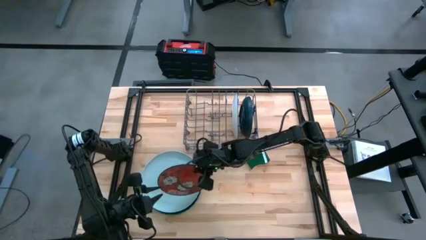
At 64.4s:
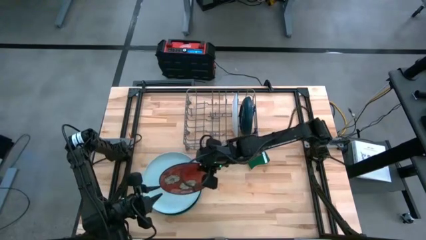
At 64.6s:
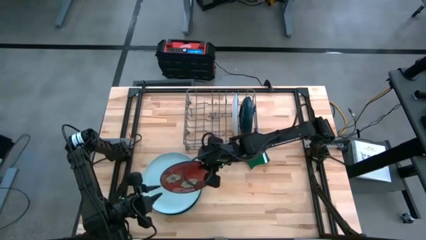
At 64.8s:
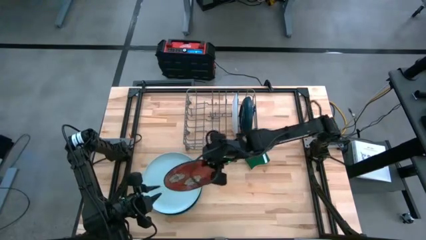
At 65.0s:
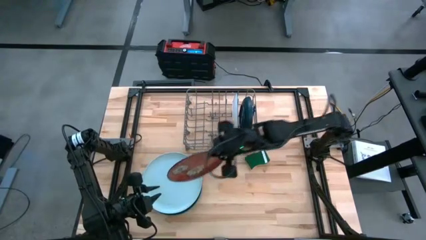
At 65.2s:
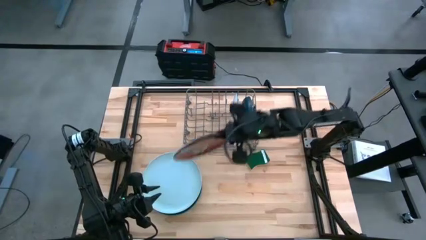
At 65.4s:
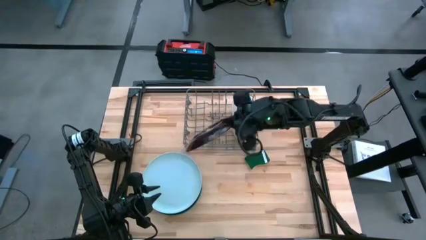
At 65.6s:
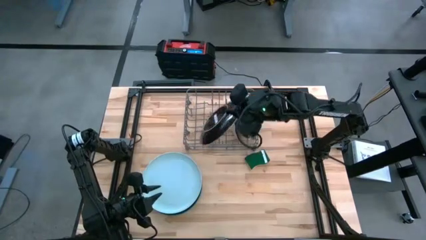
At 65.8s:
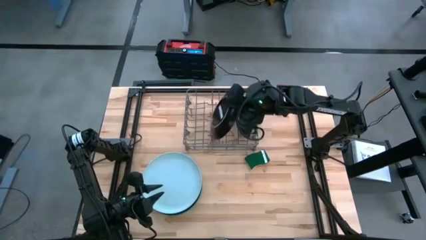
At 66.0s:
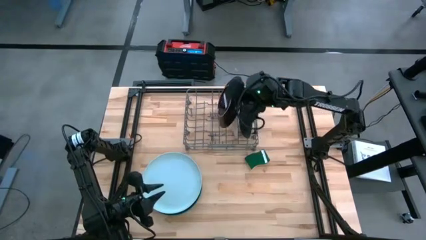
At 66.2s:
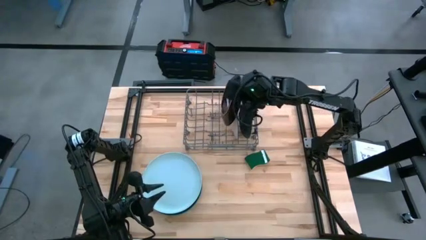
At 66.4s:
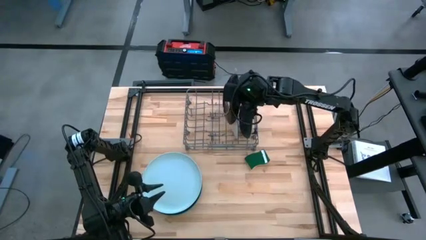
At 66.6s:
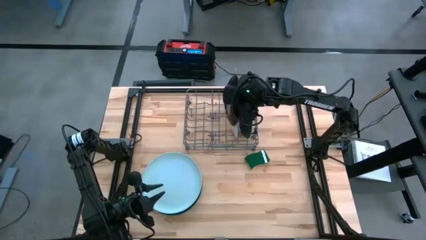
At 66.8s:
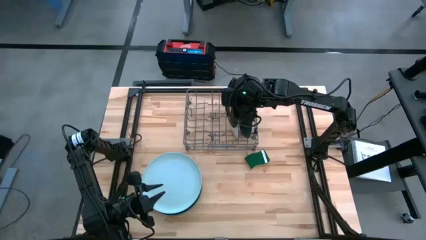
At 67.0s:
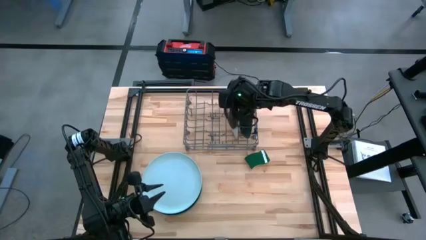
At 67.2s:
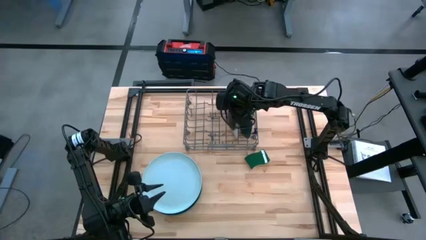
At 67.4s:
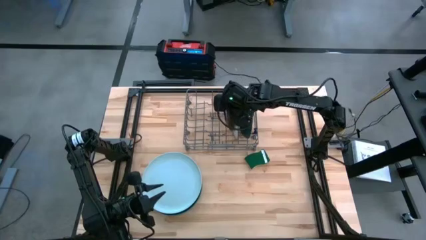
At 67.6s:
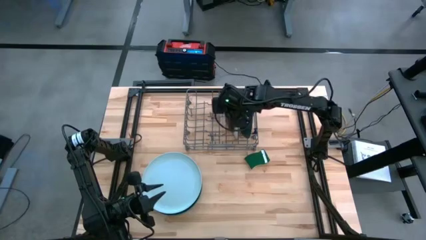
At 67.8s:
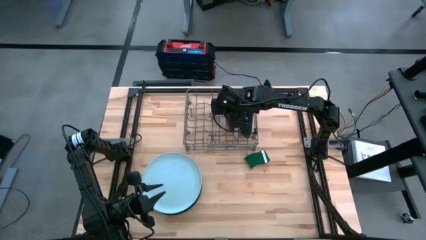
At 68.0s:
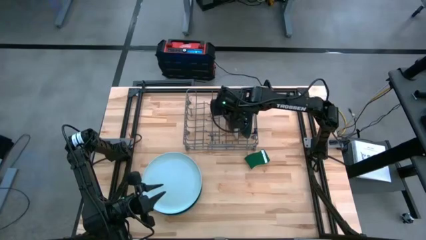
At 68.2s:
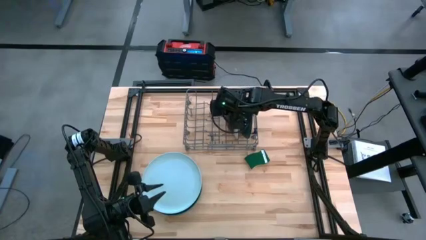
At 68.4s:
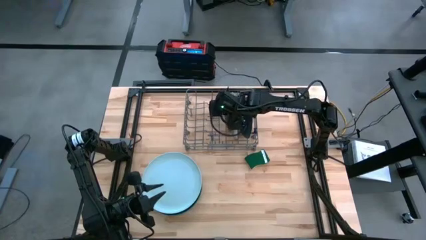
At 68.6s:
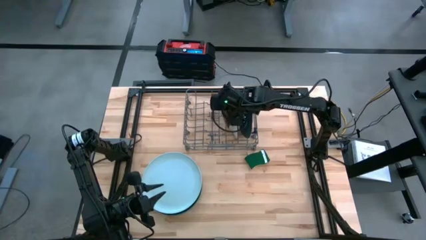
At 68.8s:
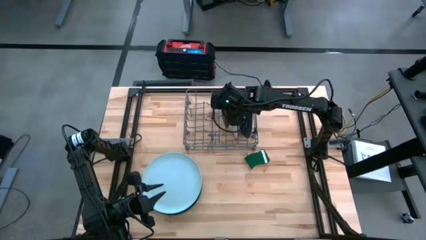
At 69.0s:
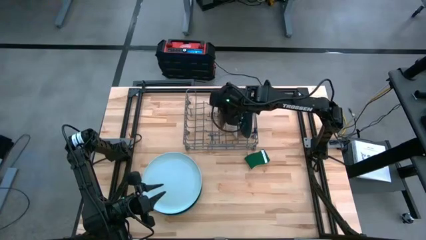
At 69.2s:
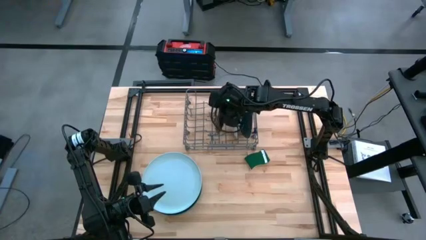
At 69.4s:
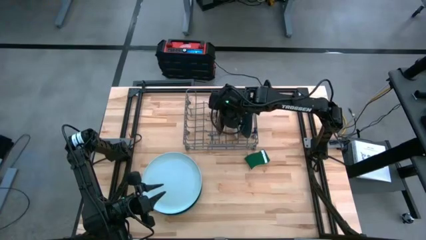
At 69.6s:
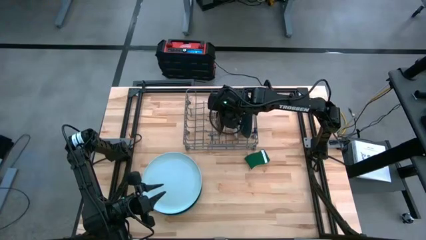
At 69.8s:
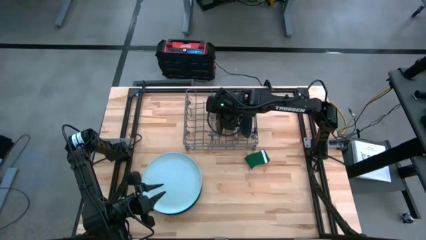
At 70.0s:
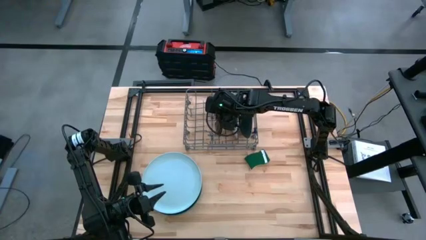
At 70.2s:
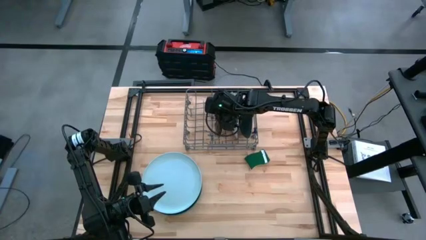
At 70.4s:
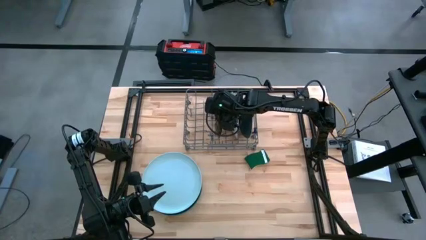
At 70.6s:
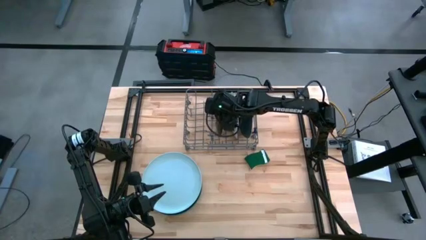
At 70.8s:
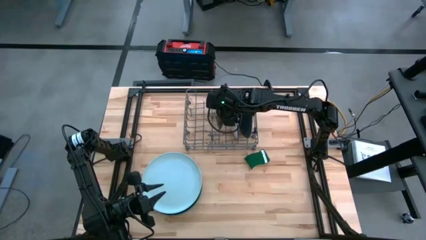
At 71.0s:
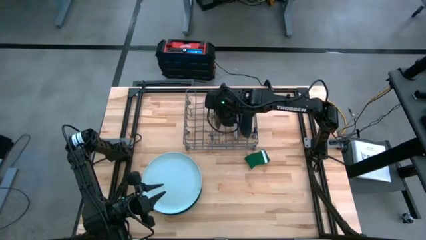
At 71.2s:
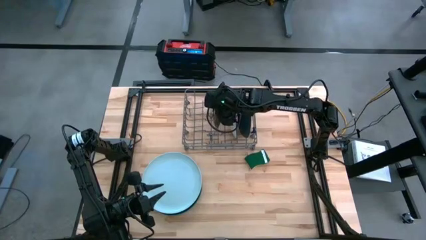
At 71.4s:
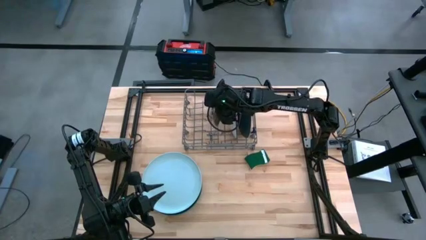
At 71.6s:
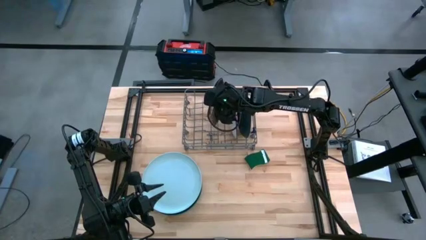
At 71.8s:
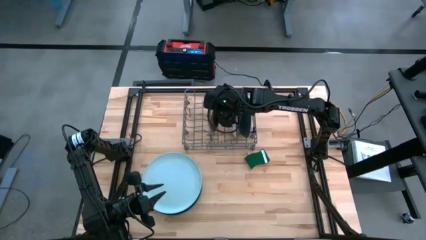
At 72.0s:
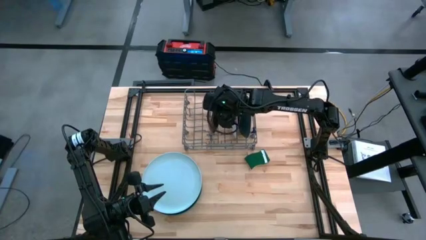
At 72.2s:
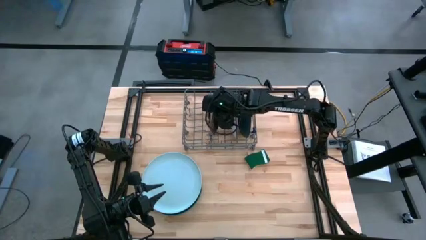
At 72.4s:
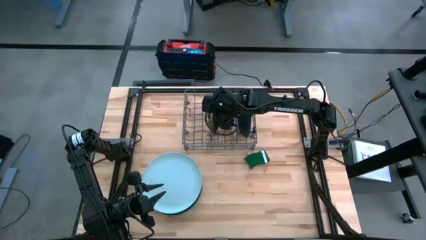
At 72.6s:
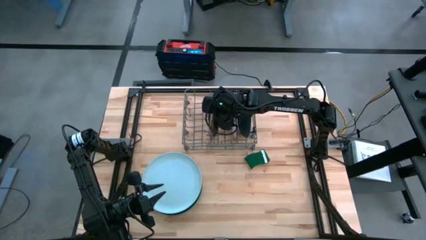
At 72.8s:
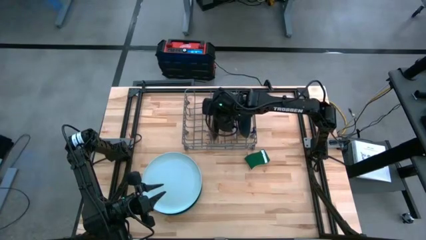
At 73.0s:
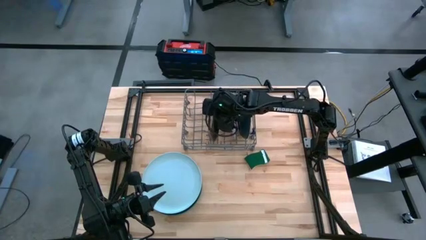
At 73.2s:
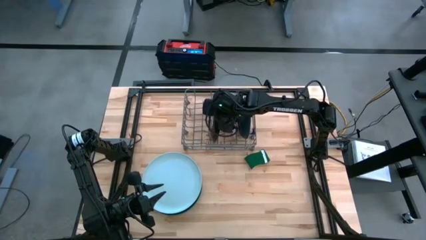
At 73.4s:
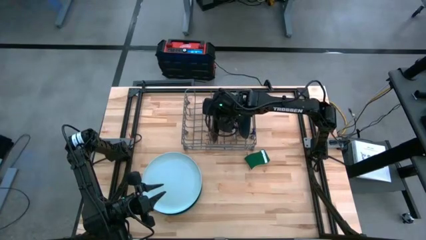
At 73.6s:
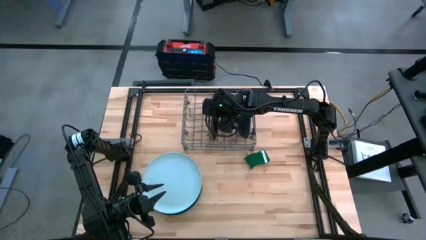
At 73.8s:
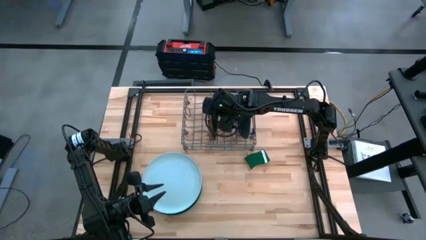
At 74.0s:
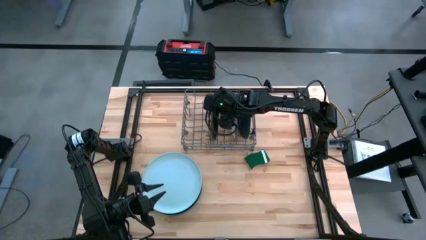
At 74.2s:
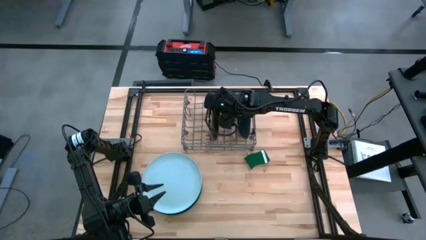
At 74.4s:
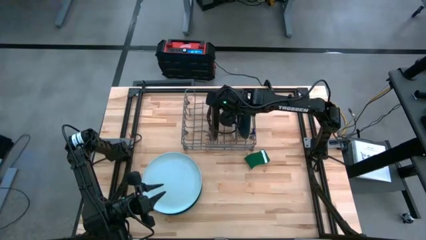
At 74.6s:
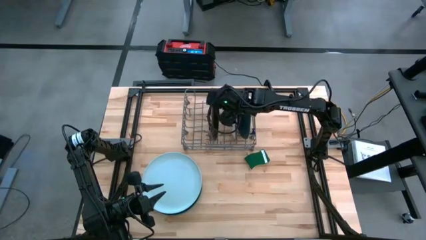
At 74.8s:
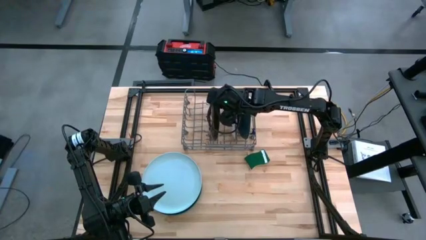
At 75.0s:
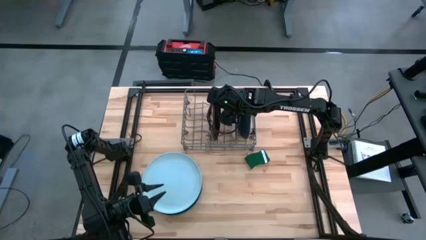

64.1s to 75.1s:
Task: Sort dishes
Put the red plate into the dish rack

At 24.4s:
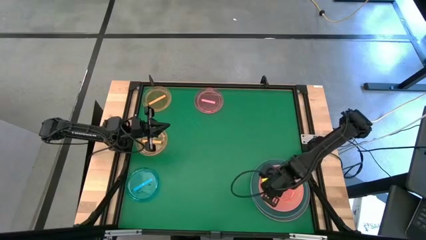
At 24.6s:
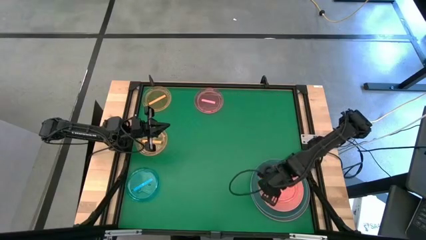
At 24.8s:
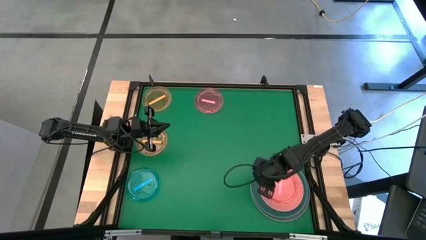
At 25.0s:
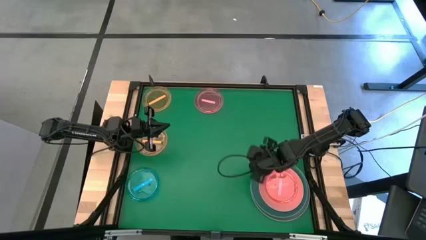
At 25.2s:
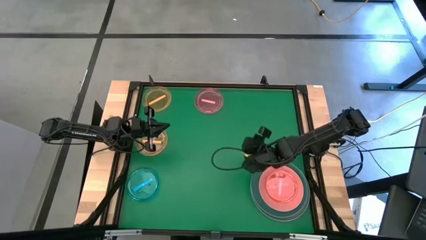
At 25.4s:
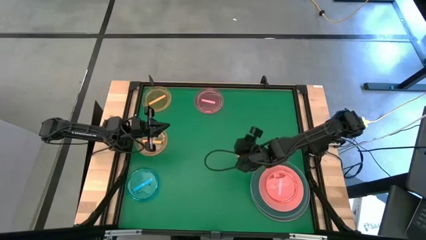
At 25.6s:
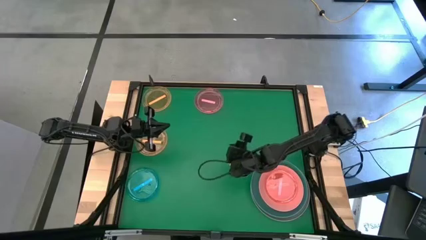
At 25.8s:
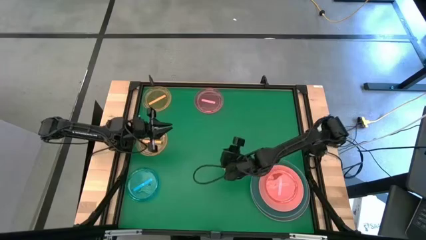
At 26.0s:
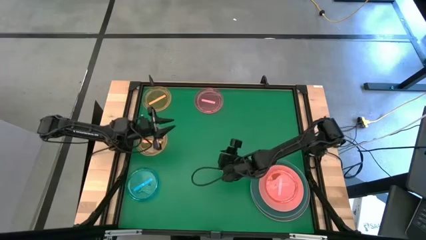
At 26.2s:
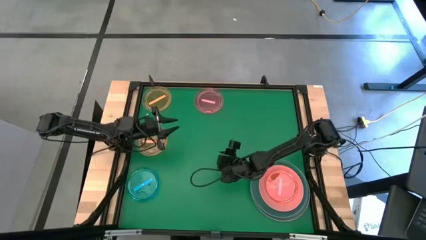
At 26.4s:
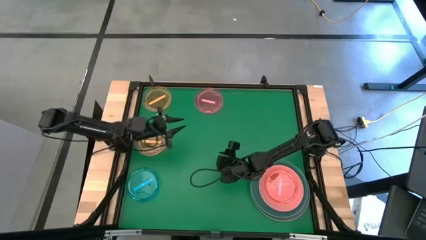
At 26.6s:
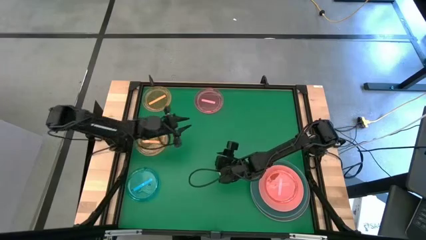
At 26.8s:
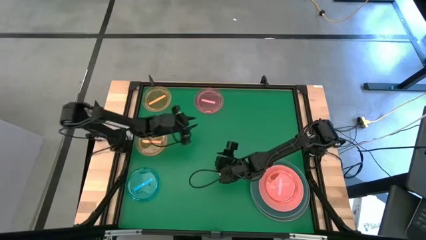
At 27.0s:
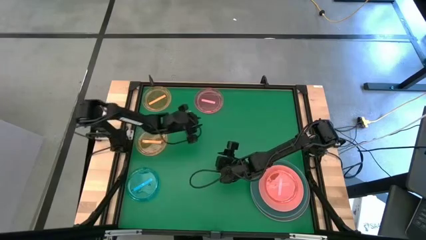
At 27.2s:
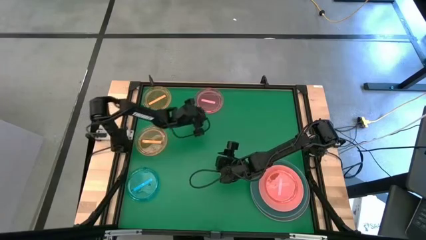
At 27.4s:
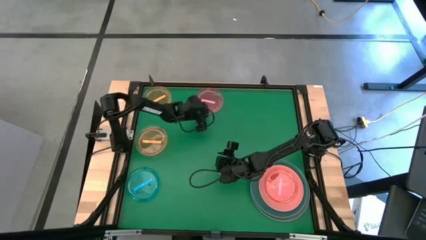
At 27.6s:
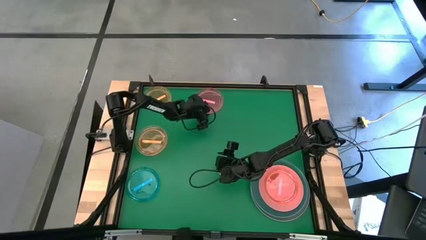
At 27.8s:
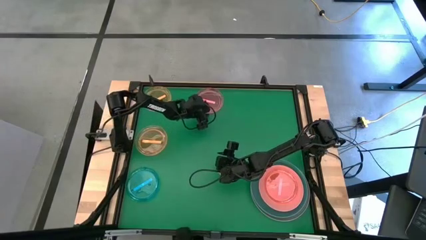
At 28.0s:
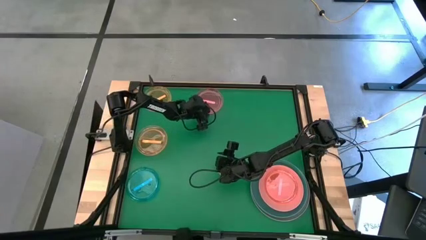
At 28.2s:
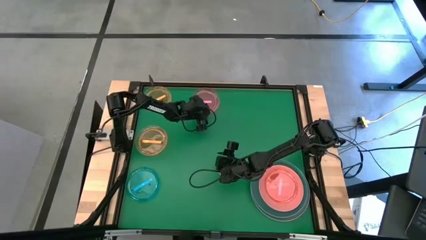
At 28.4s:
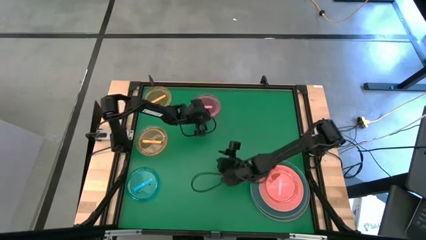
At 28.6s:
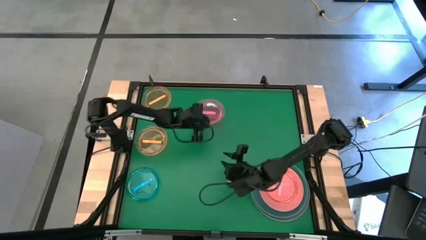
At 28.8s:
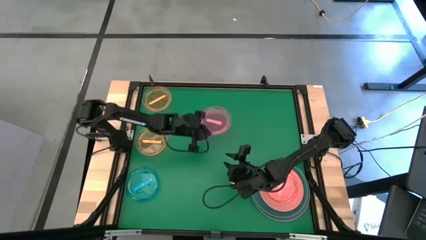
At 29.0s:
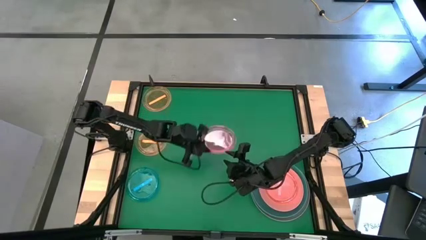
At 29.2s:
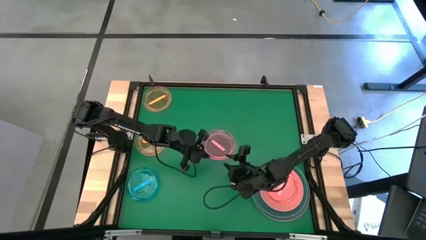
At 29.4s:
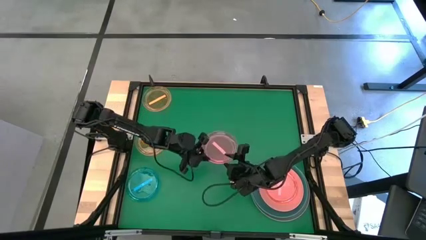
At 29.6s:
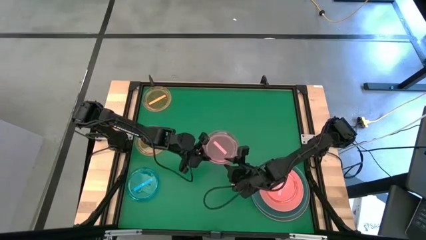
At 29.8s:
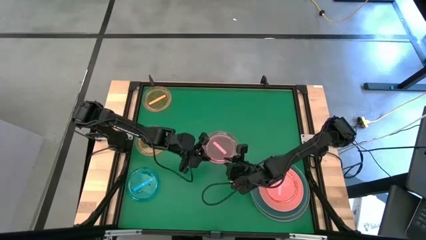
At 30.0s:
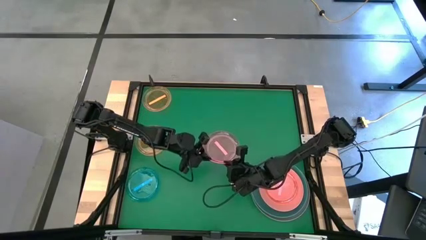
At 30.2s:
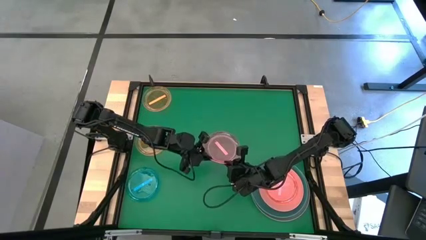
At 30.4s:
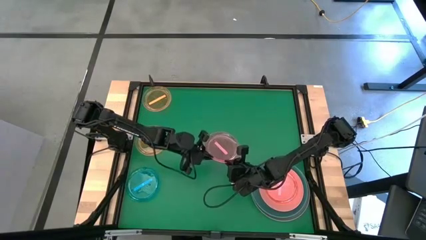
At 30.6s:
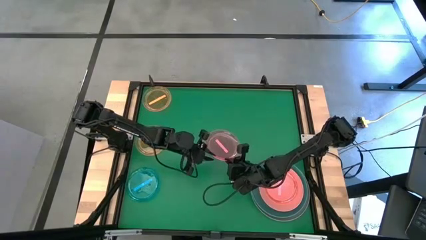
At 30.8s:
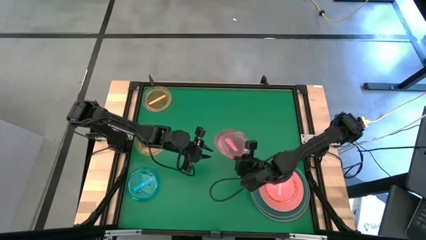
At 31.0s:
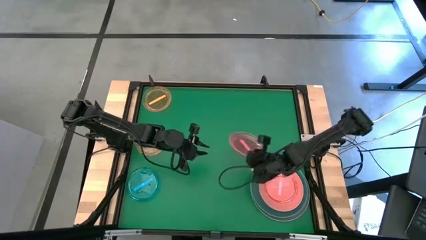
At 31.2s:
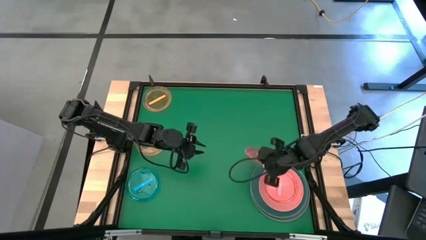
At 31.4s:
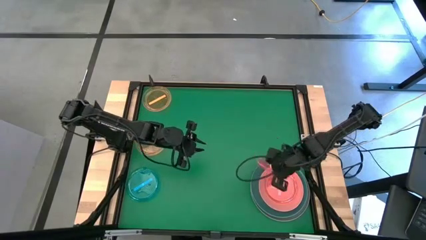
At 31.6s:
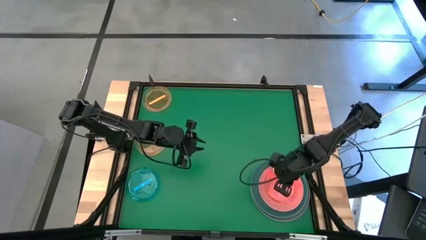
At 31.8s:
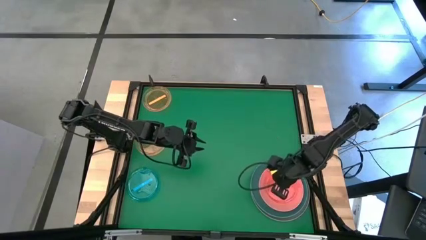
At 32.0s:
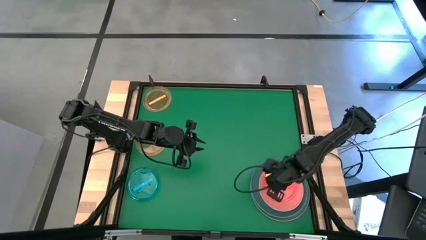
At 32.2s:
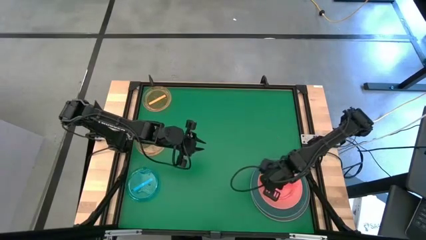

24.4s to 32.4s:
Task: Stack plastic plates
Stack the light red plate on top of the light red plate
